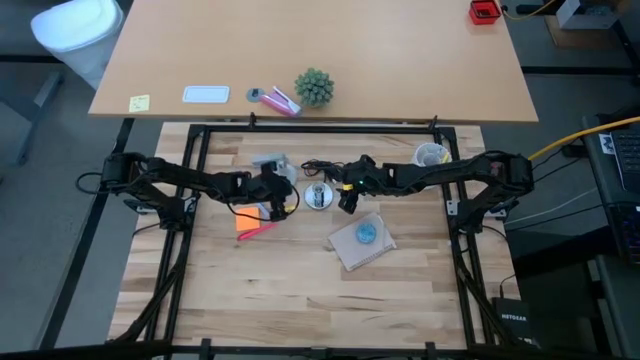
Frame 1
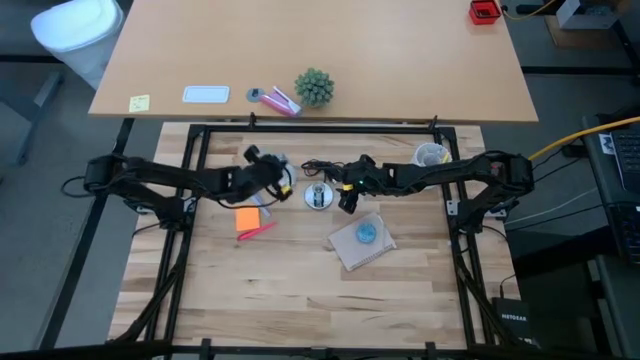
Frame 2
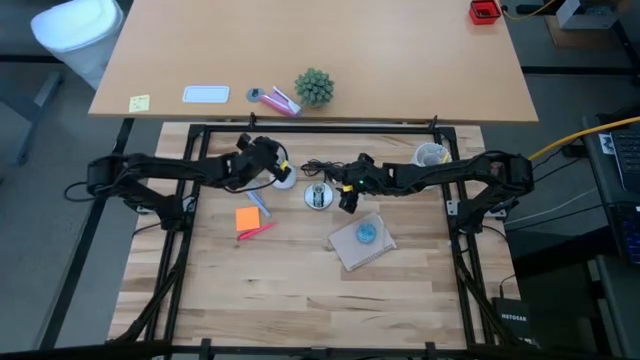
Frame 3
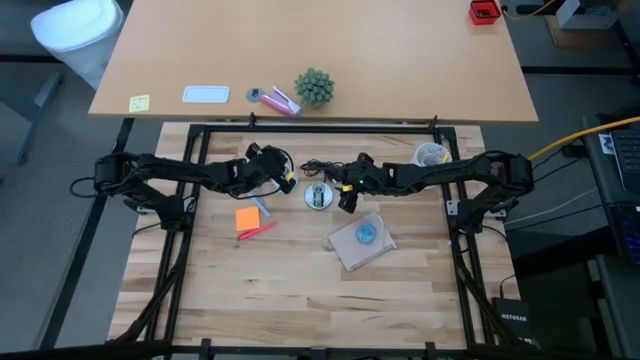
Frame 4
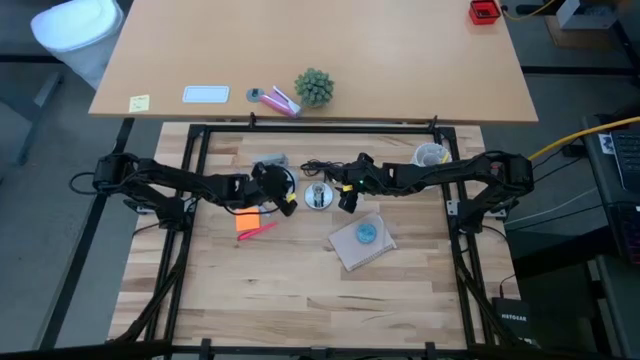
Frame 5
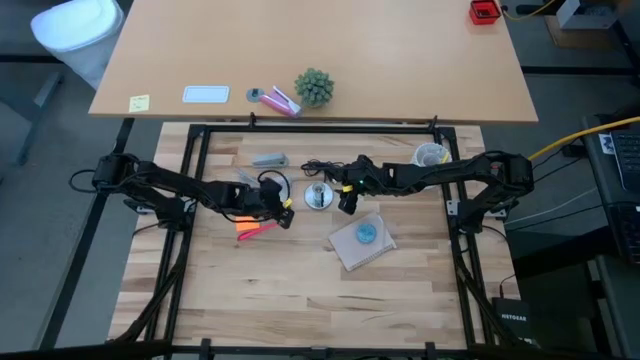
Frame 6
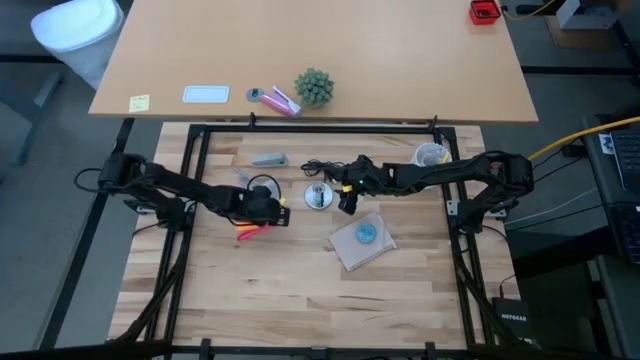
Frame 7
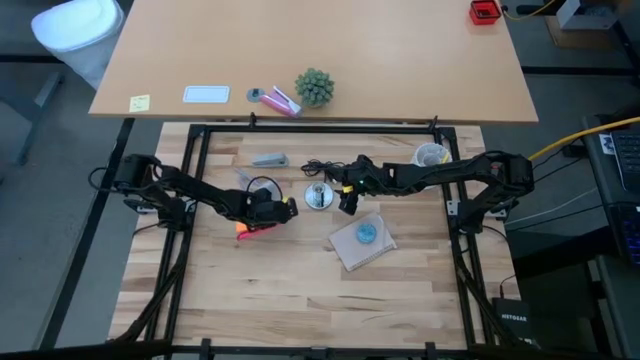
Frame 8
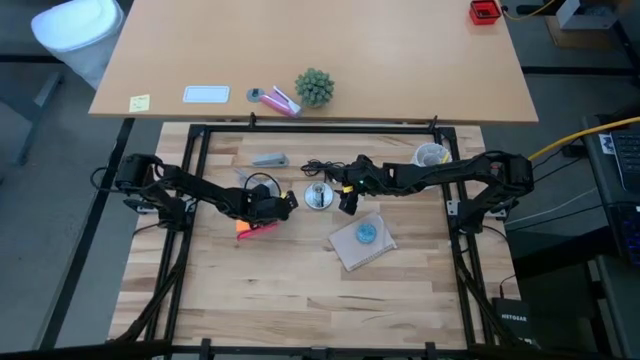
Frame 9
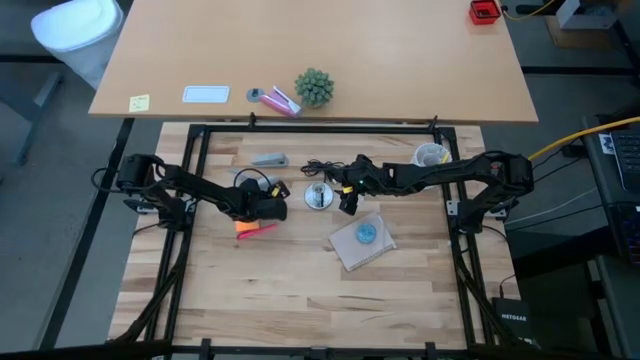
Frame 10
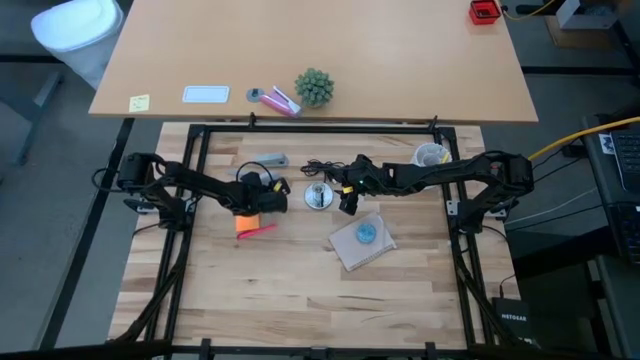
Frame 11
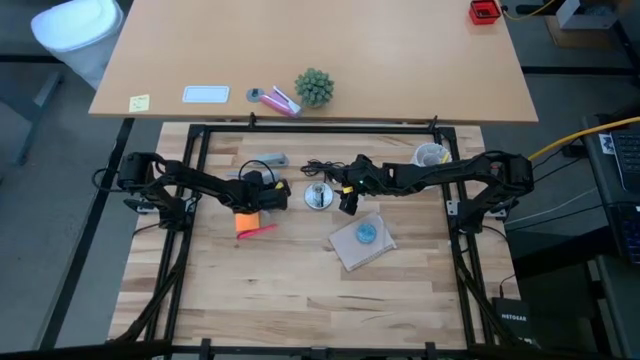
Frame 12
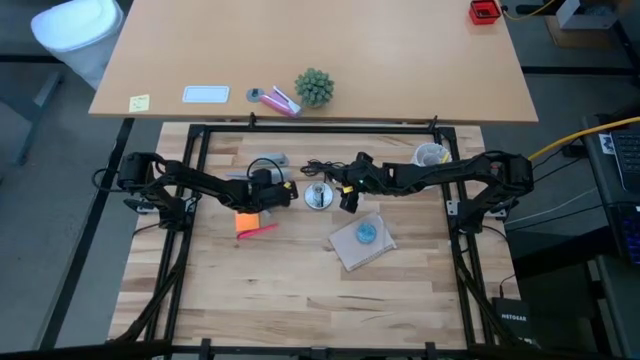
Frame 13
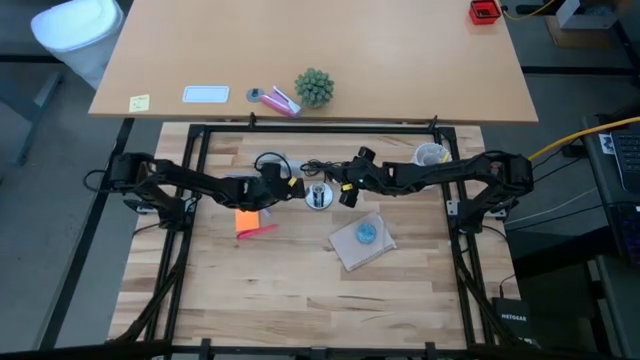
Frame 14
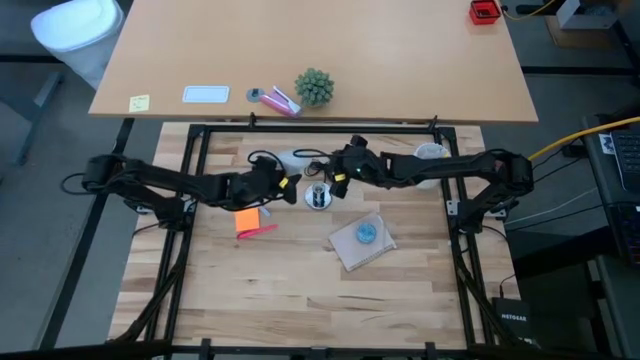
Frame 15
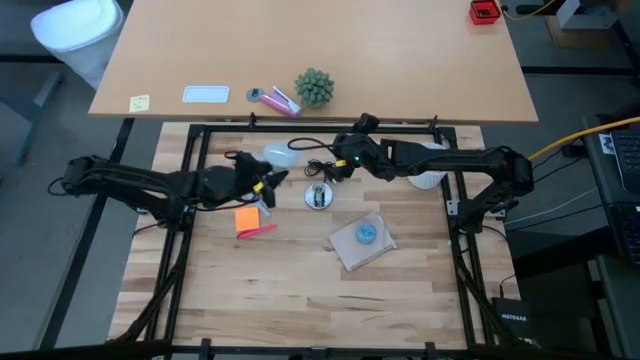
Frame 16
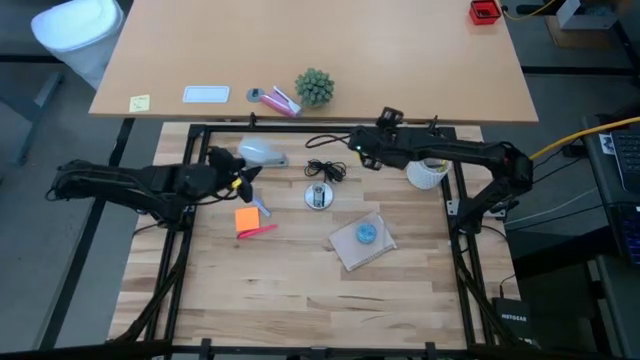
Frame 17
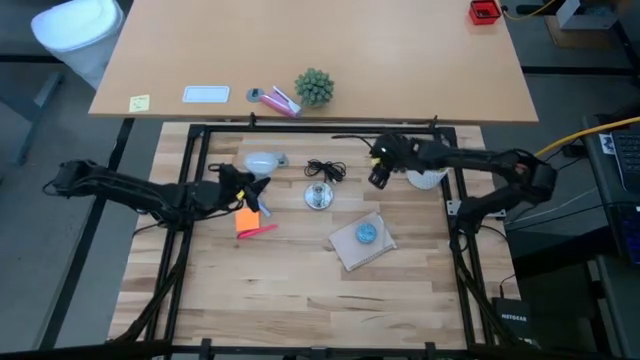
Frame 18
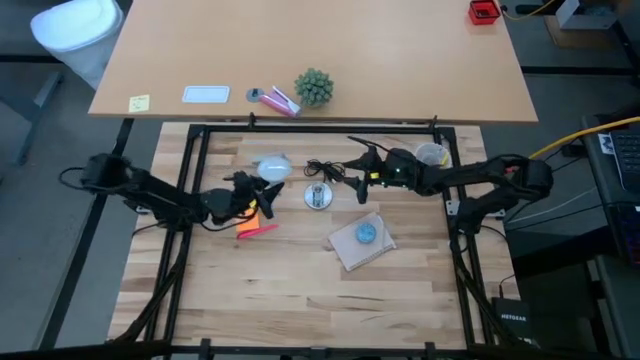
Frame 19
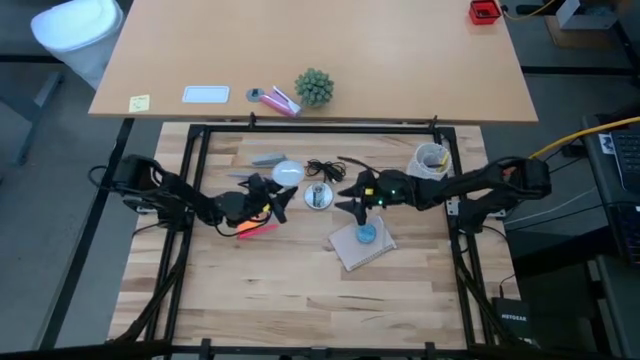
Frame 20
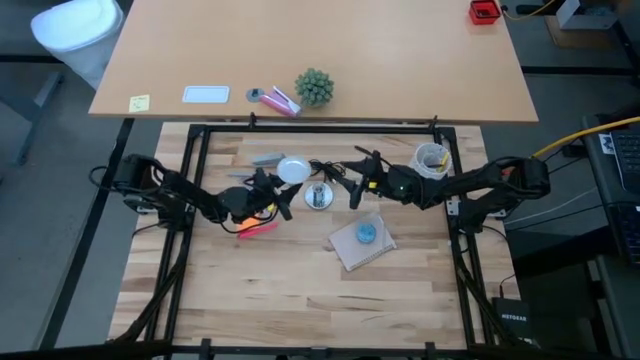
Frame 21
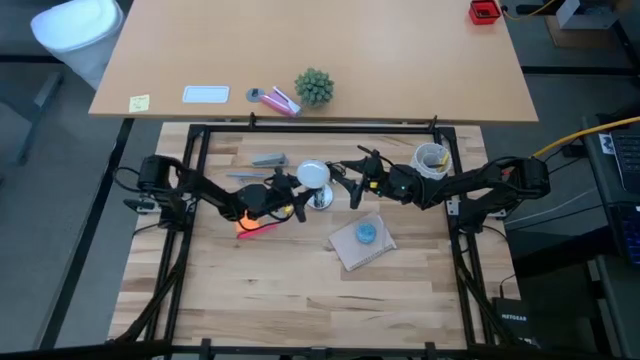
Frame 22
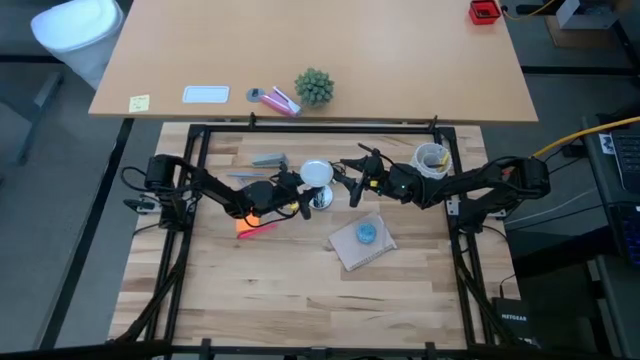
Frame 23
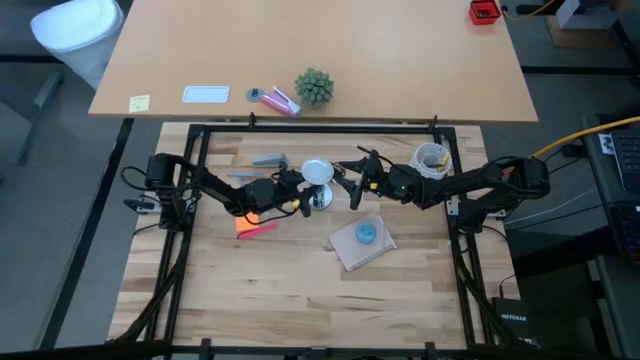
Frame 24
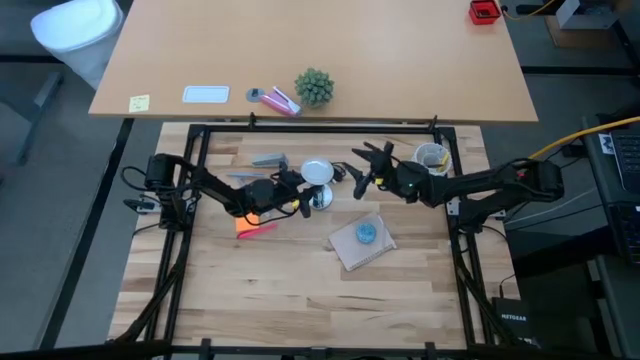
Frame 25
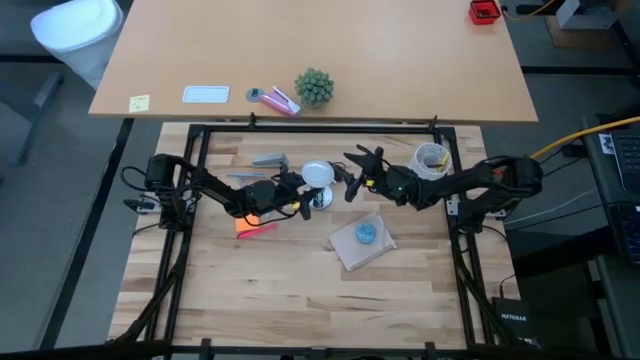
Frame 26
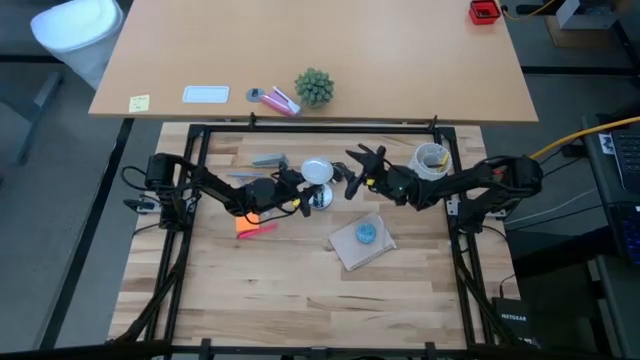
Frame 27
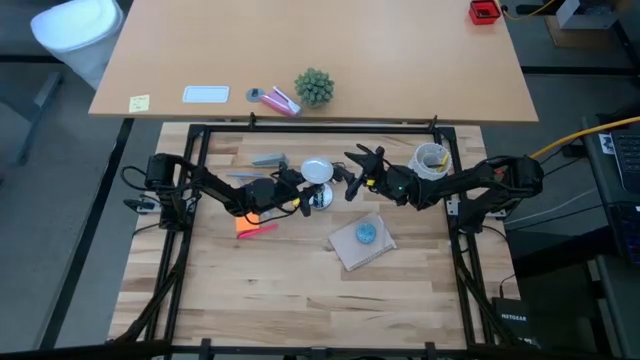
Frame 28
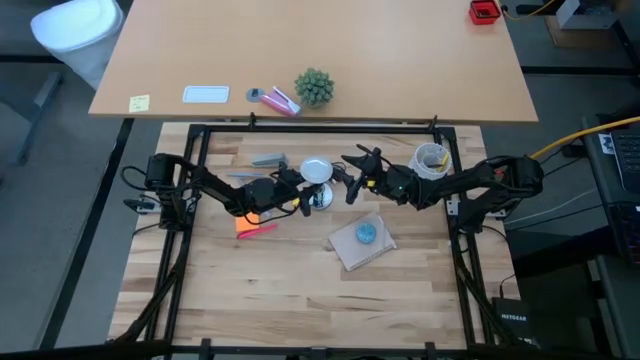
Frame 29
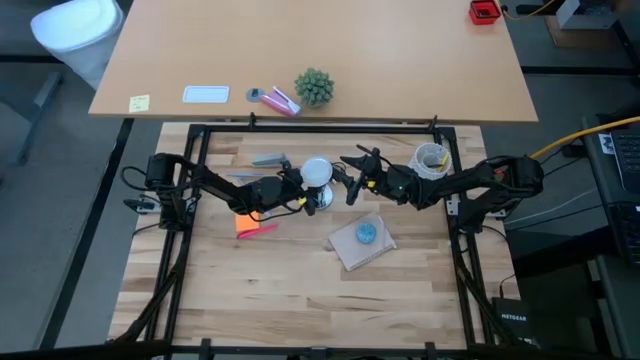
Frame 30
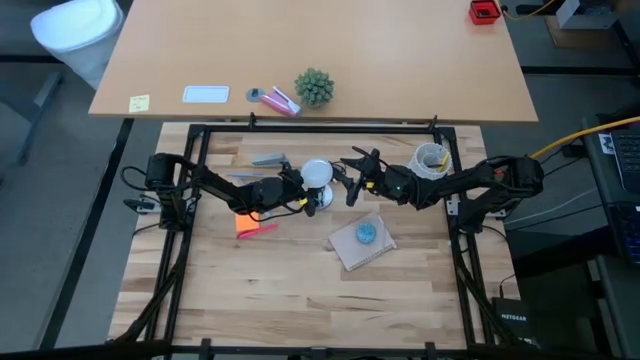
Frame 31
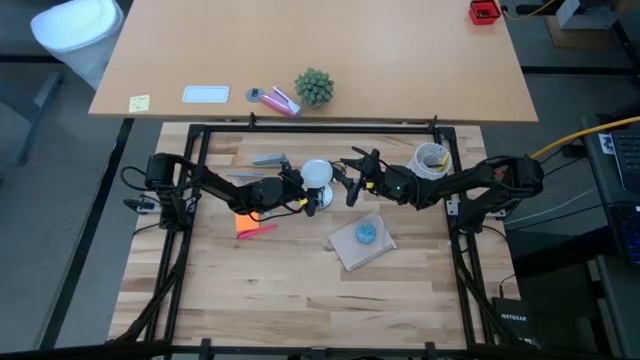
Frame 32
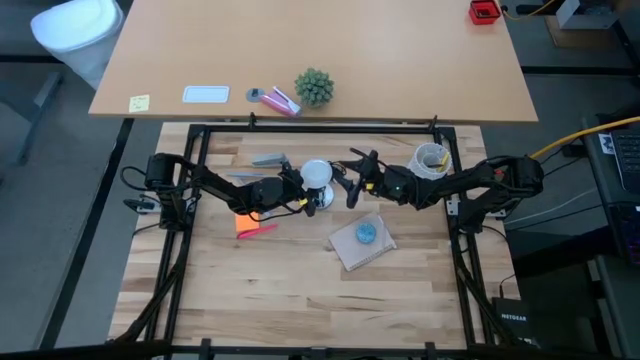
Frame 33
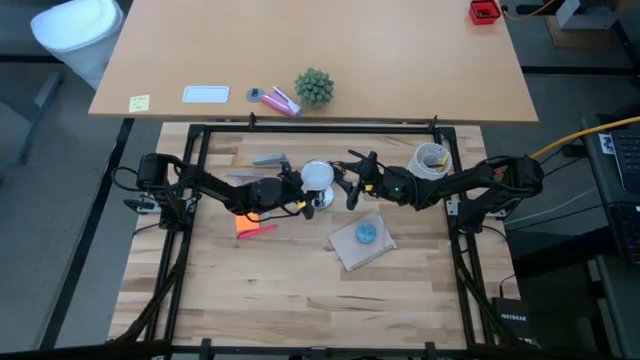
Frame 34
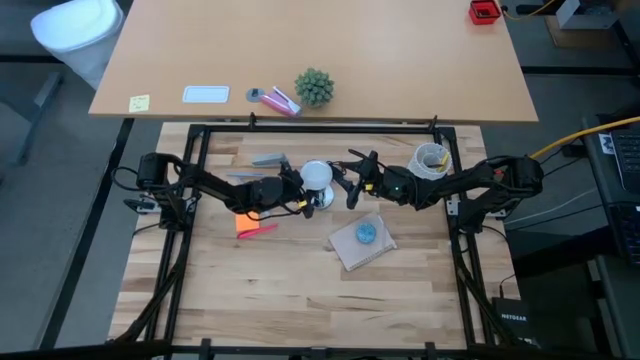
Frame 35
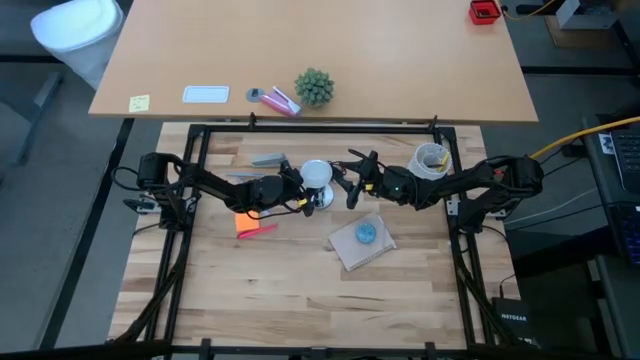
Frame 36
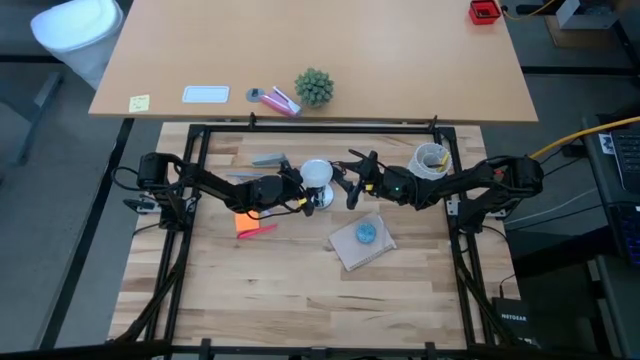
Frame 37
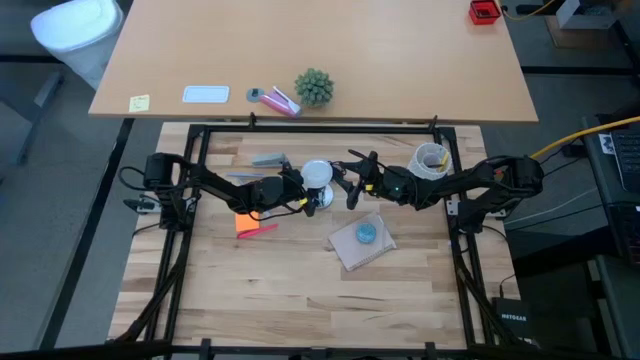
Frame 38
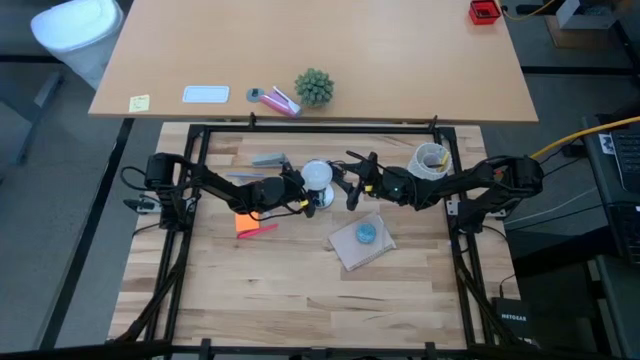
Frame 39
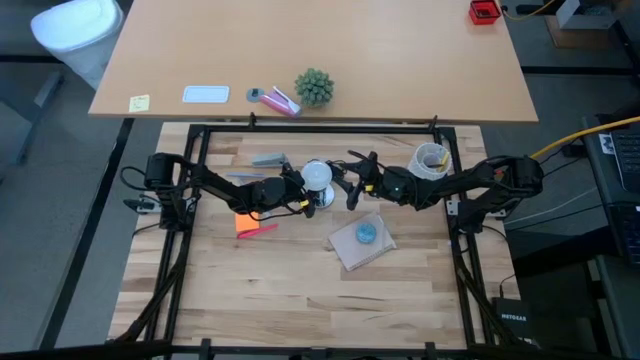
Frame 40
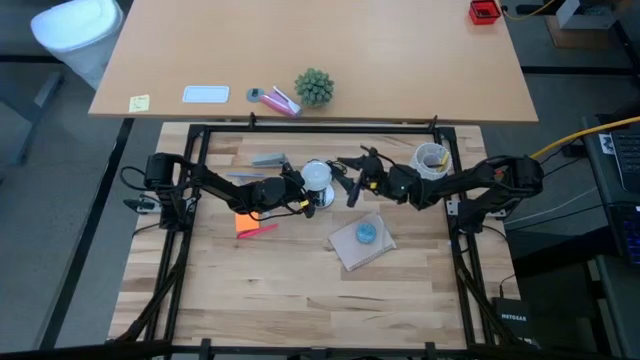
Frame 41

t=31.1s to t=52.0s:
Task: Screw lightbulb
Insert the lightbulb into the lamp
